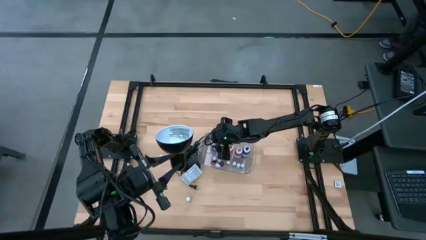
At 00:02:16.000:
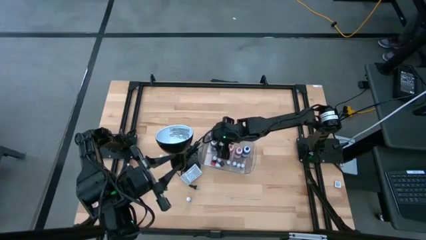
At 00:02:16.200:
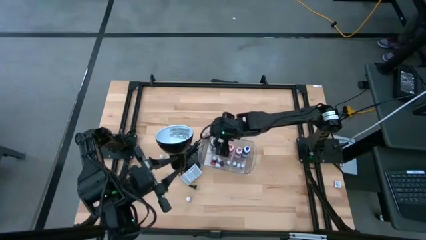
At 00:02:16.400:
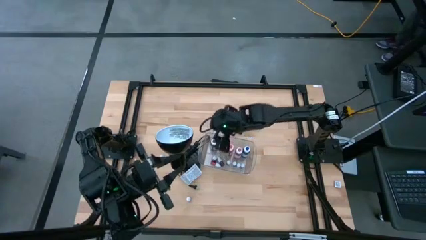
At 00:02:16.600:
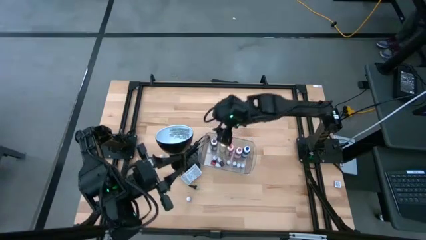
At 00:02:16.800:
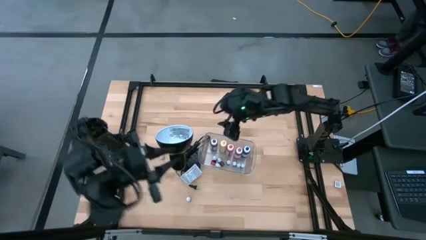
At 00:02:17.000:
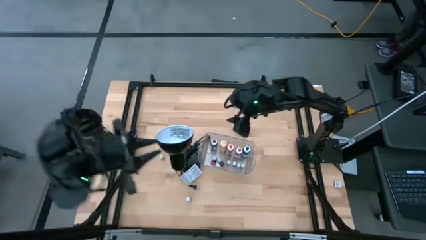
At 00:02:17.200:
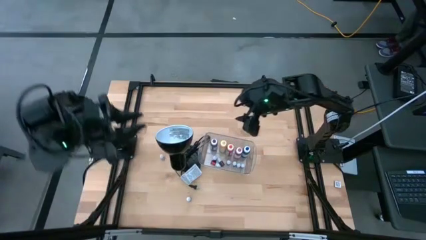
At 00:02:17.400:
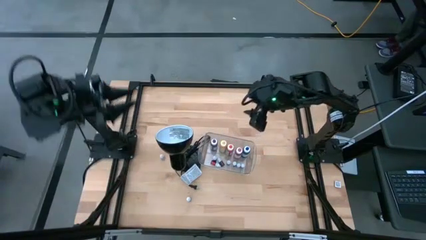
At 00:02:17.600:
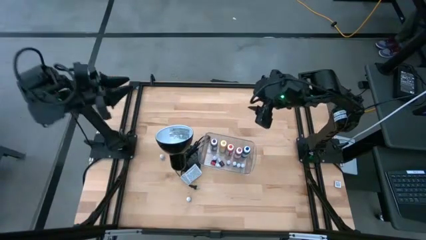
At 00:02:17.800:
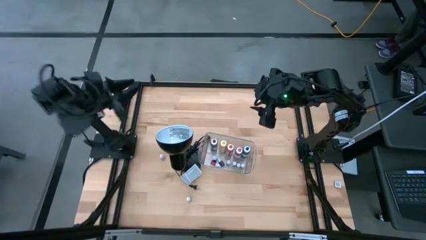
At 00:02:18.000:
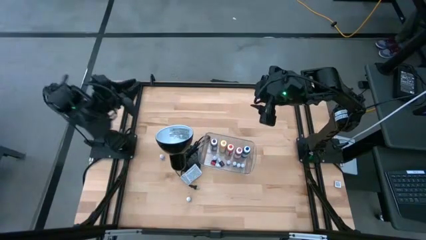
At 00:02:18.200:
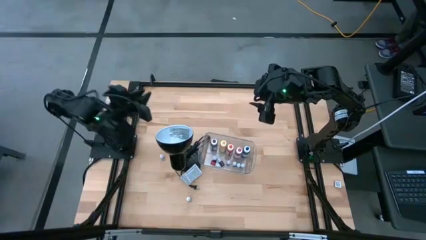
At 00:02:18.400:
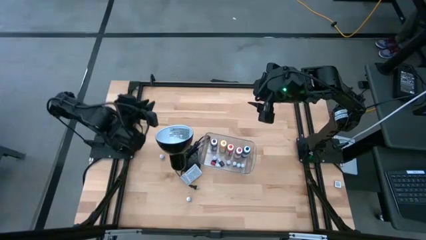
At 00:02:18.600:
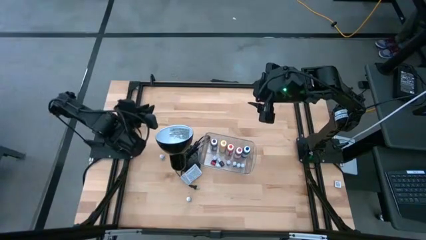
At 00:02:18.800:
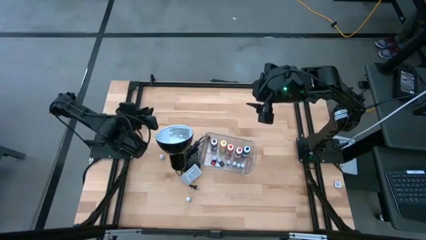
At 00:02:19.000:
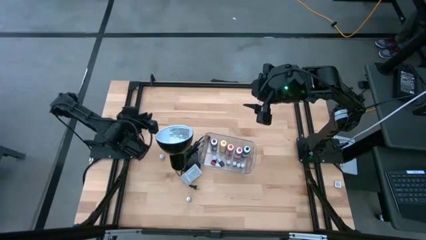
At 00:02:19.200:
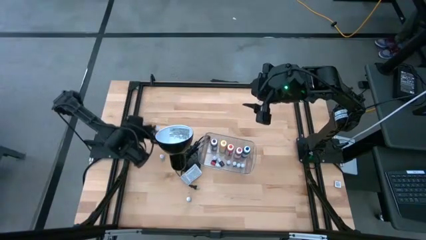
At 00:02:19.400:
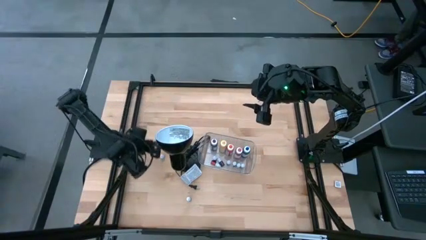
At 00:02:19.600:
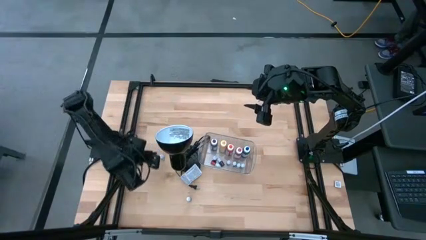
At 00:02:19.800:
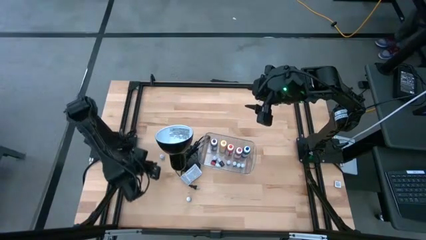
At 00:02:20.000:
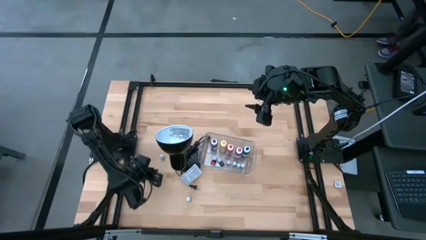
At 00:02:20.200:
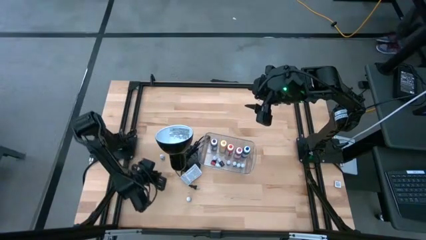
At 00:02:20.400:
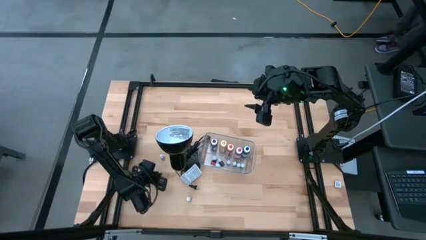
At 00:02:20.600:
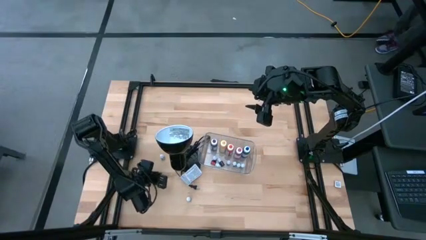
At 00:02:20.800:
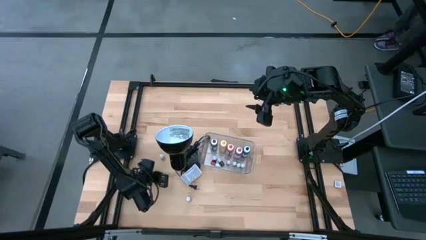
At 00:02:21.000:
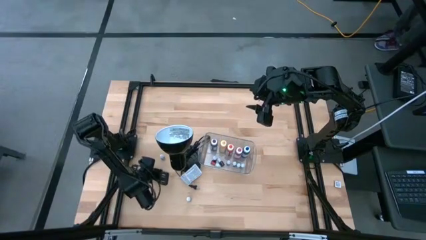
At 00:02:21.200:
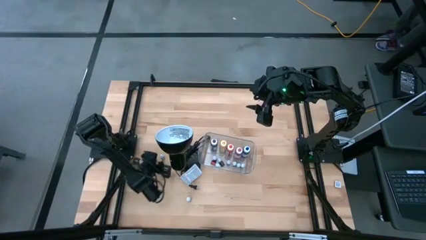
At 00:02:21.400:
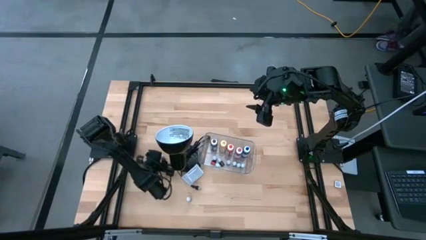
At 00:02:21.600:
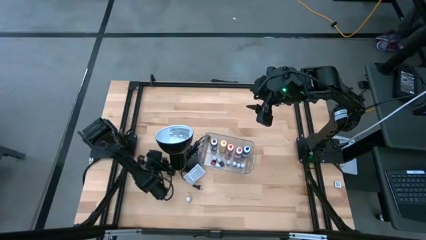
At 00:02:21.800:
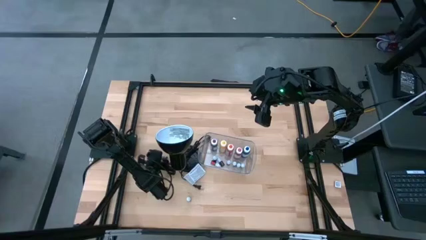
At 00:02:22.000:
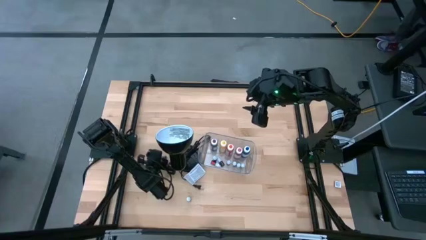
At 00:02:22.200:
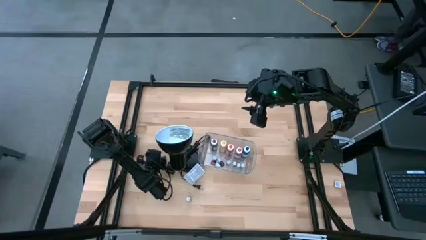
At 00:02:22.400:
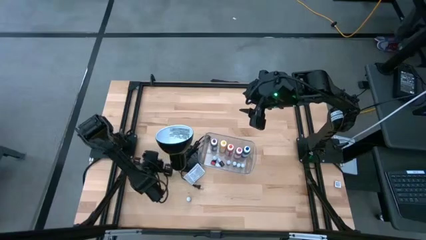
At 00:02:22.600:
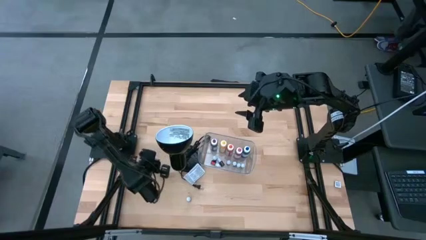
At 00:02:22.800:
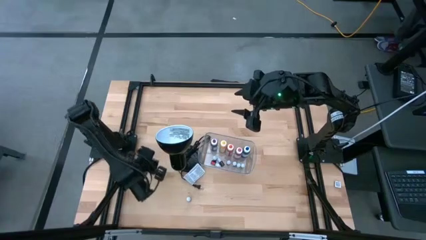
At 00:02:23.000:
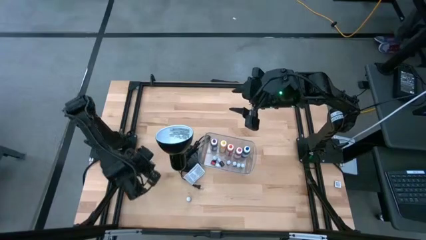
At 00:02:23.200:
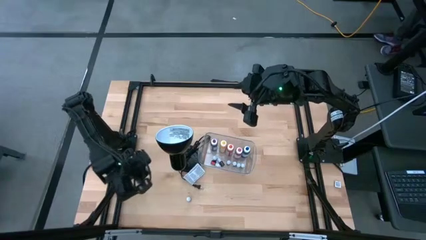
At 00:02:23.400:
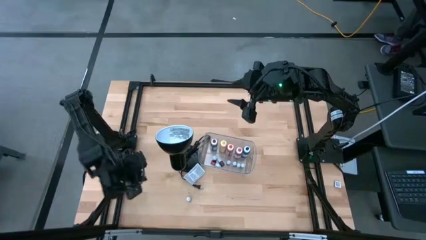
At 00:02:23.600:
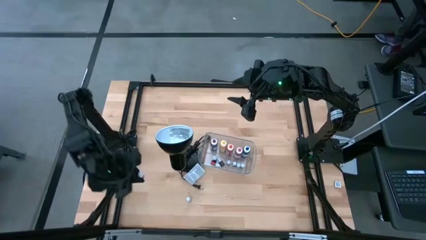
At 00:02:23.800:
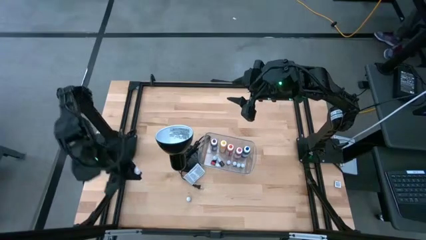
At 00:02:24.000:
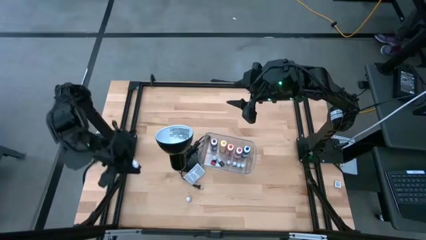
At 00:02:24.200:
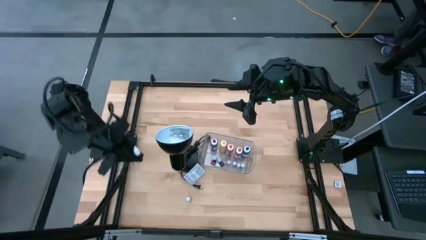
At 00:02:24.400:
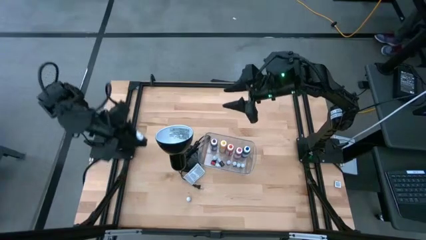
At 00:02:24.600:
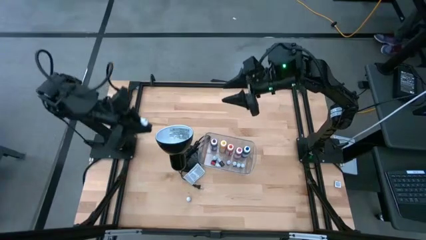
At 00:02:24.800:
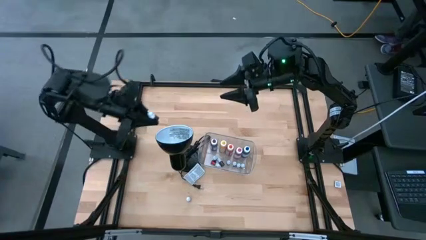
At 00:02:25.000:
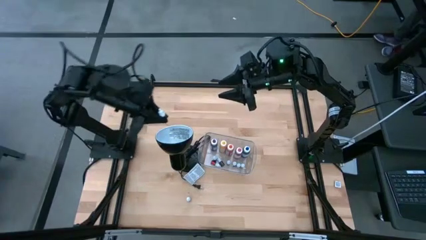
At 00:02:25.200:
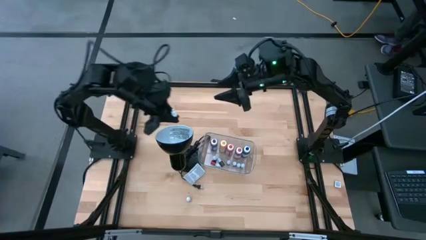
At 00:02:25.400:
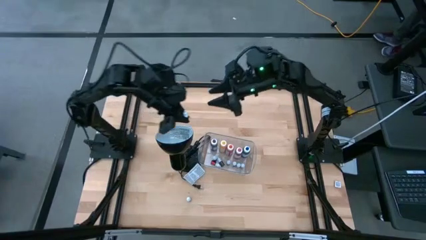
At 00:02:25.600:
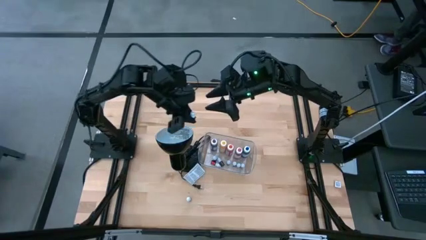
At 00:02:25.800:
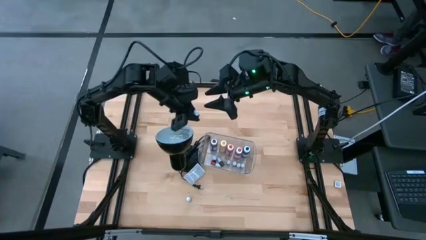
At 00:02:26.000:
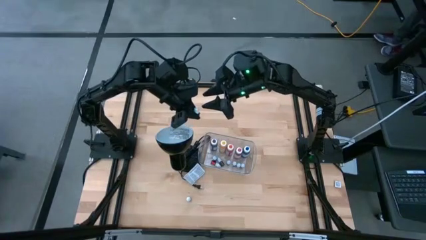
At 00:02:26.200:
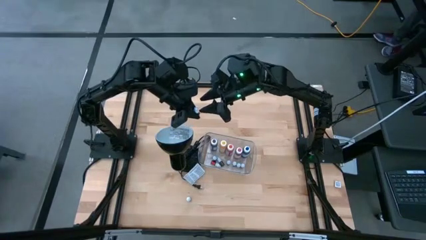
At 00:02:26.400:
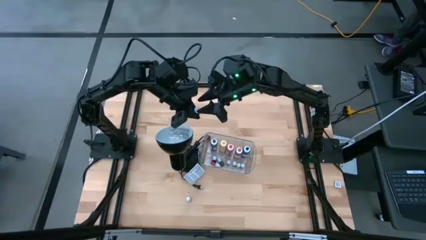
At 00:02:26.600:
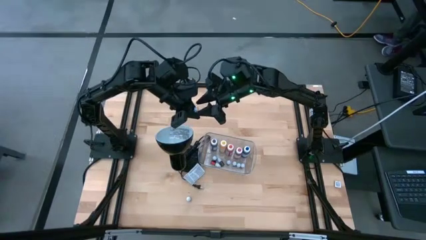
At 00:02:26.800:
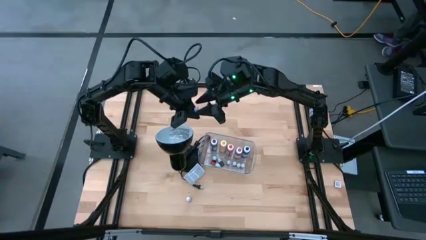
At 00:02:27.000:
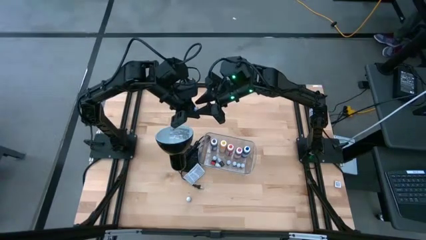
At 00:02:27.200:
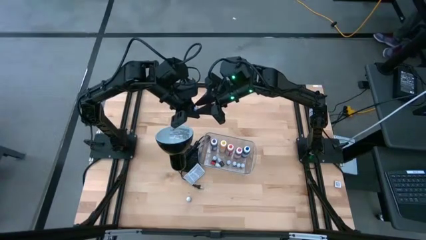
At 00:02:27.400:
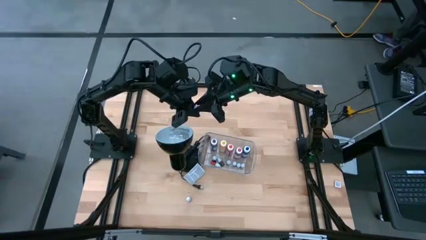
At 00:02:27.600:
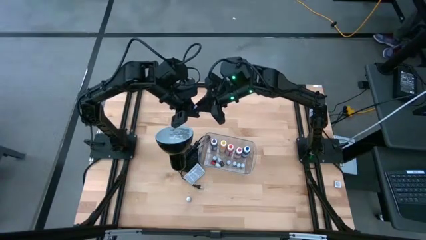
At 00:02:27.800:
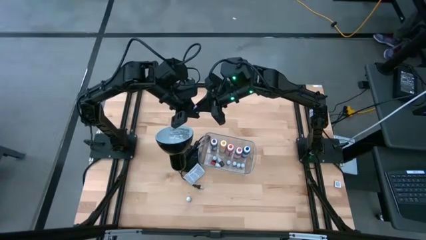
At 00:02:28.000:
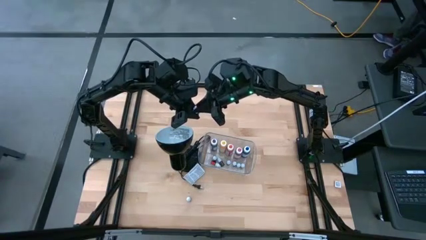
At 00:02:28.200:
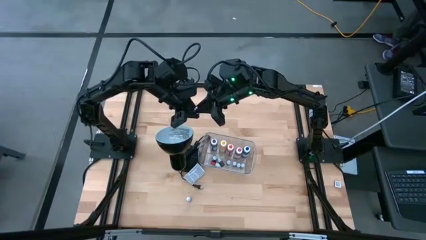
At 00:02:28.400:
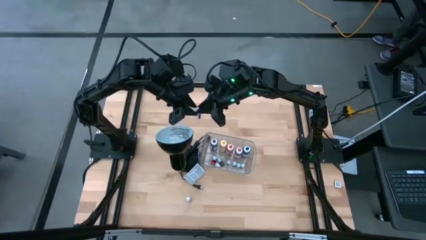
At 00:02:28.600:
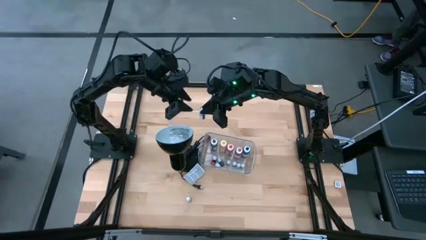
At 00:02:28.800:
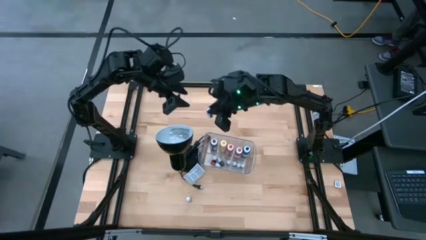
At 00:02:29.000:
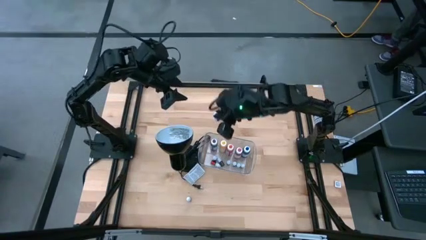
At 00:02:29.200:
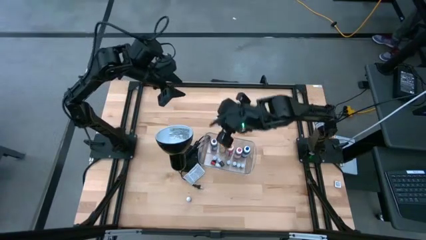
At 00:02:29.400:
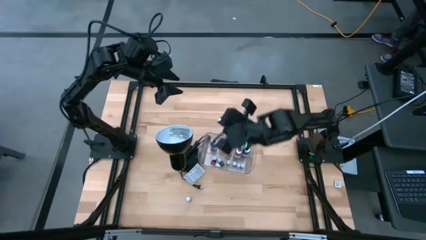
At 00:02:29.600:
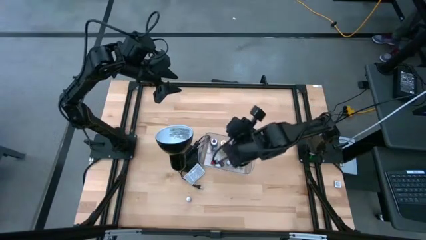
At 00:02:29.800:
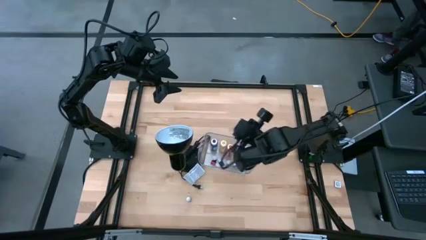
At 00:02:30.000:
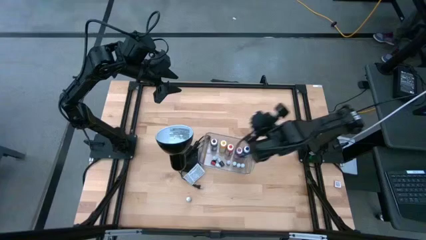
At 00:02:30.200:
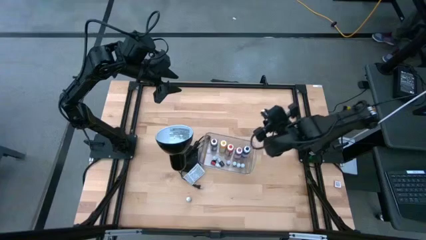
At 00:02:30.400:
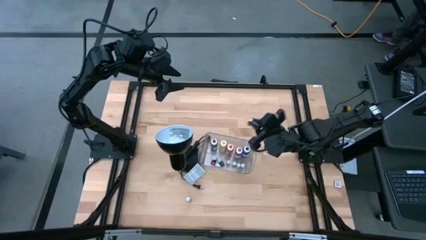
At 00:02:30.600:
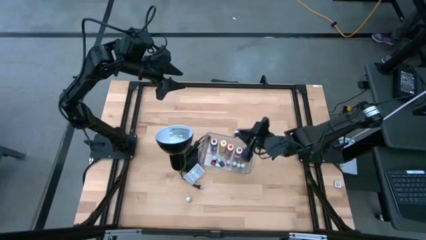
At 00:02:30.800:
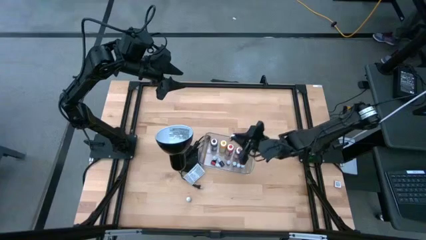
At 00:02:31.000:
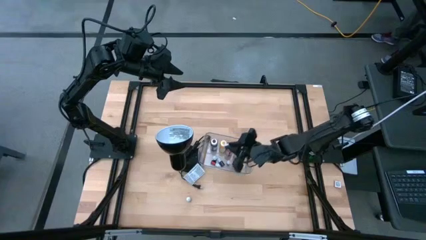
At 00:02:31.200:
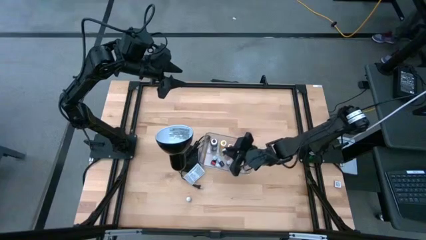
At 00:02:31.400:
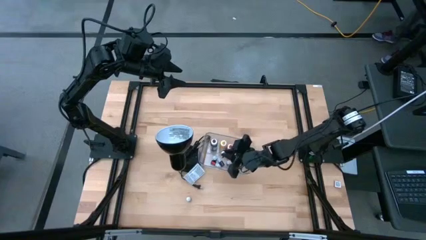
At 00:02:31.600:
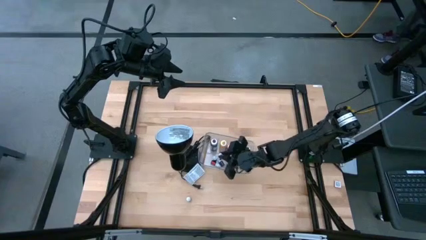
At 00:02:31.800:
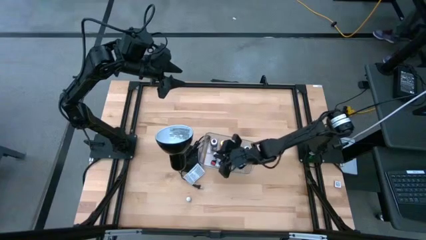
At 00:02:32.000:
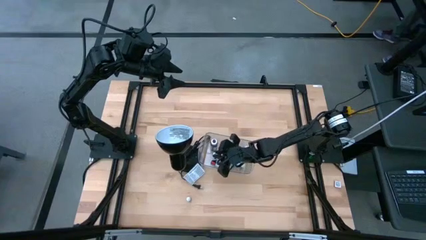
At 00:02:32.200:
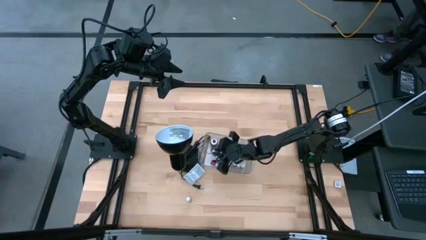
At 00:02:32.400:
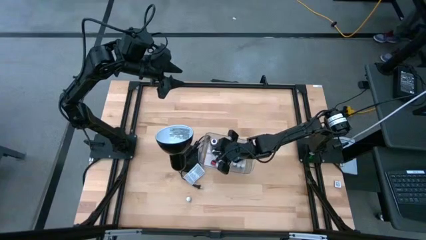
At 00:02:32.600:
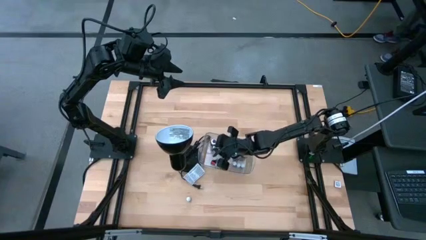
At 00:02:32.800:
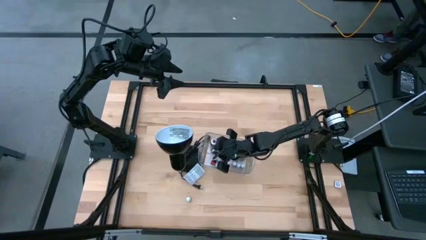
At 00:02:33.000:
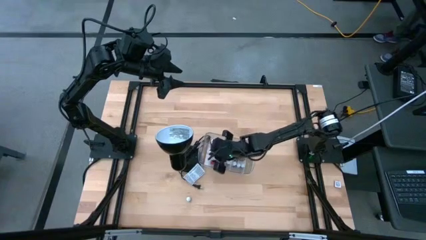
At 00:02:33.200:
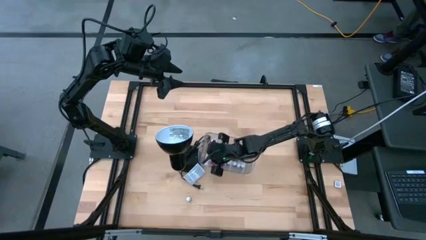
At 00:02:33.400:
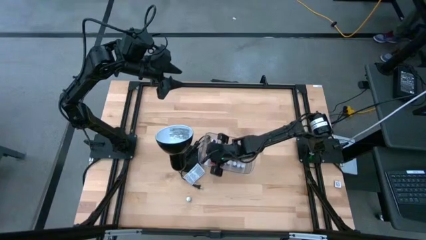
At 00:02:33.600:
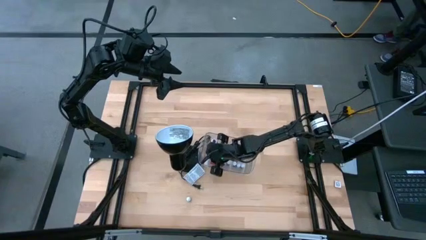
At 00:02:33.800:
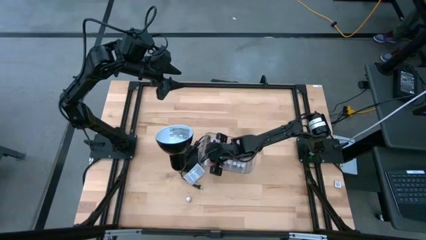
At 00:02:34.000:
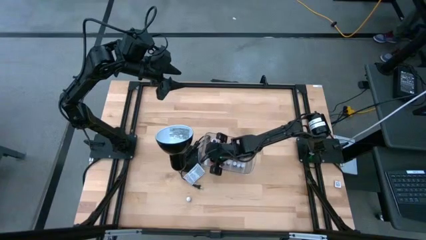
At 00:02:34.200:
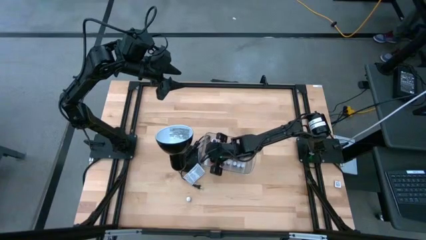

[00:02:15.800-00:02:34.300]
Task: Pick & Place food coloring
Put the small red food coloring bottle into the transparent bin
